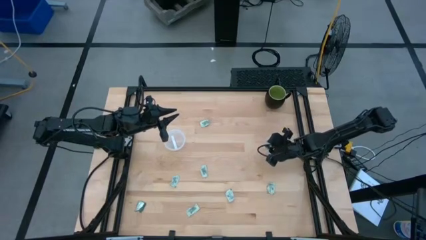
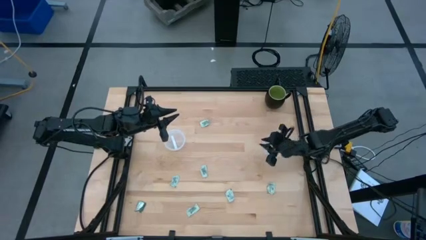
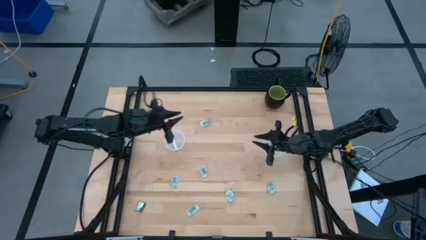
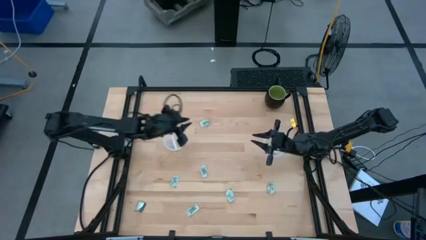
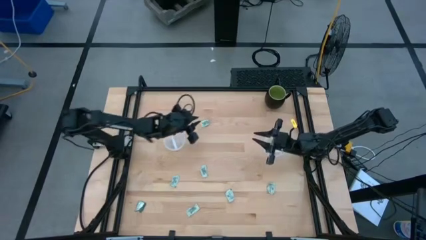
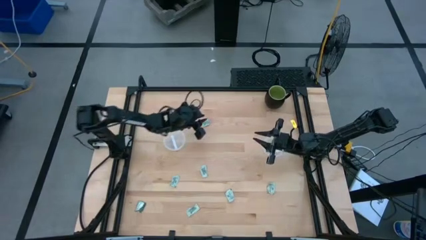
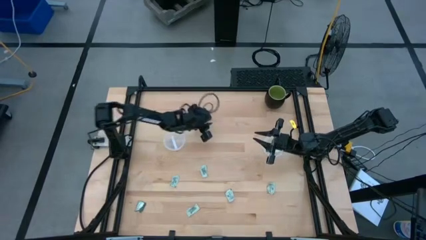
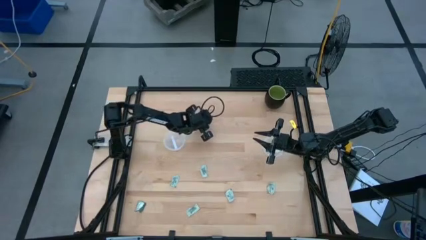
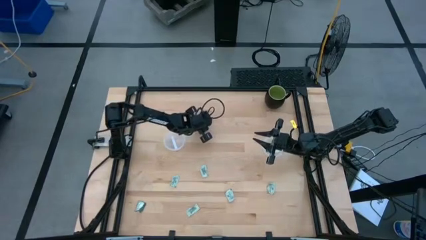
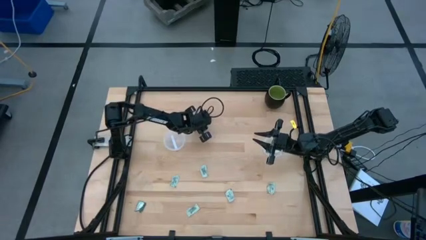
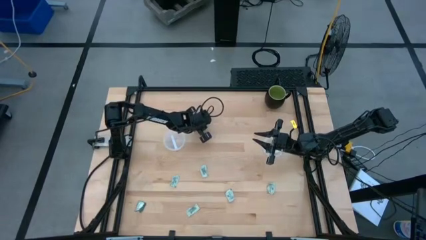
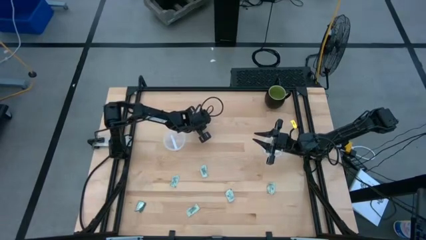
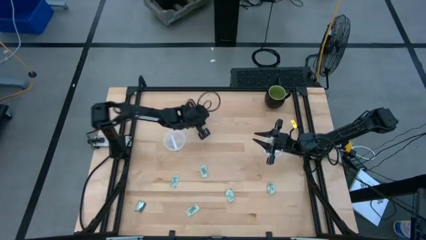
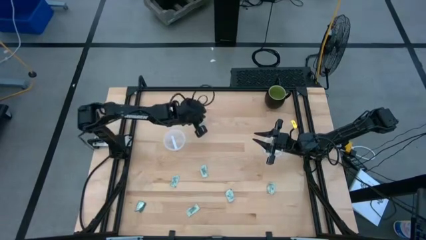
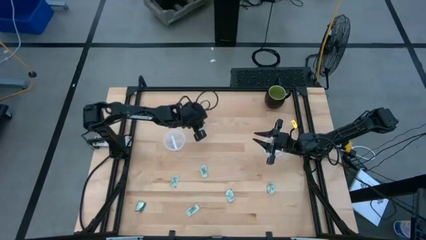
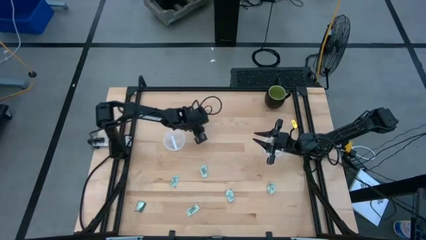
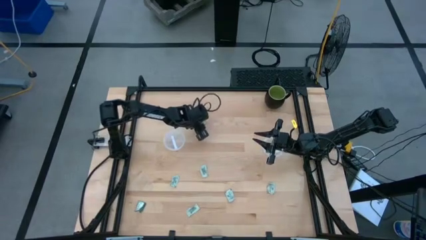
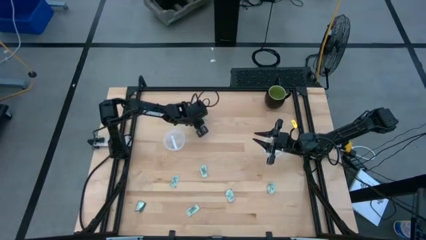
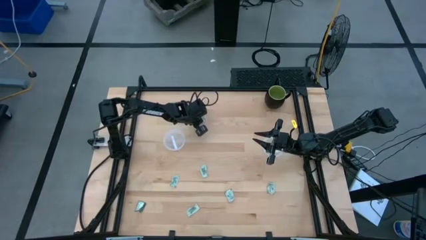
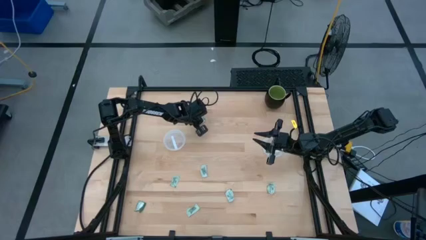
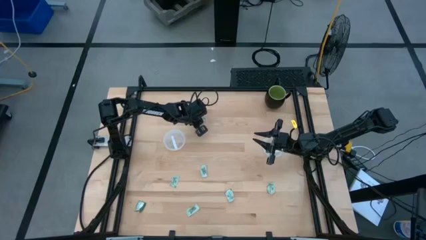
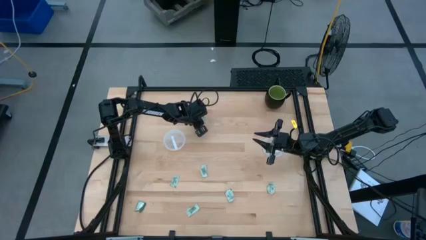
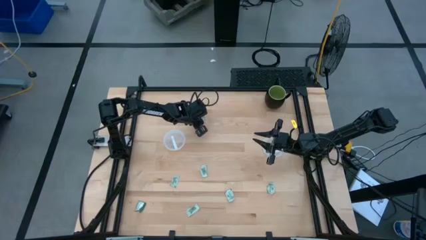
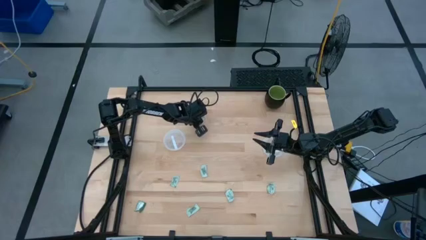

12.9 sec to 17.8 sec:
Task: Pick and place items into bin
Put the stevia packet into the left transparent bin

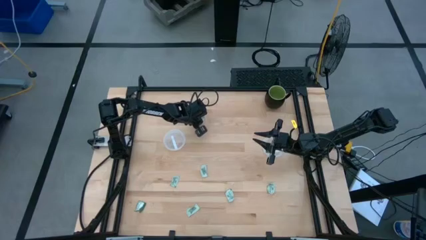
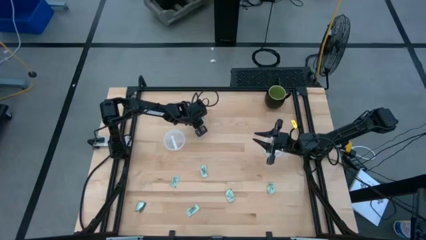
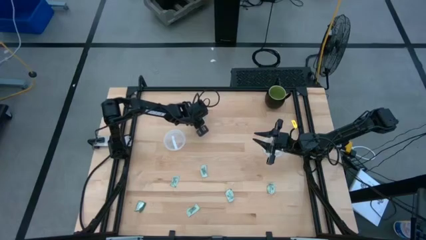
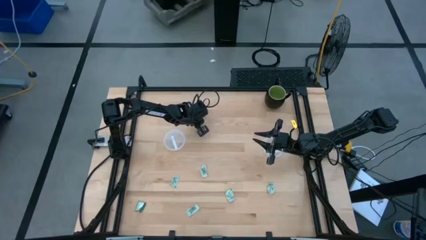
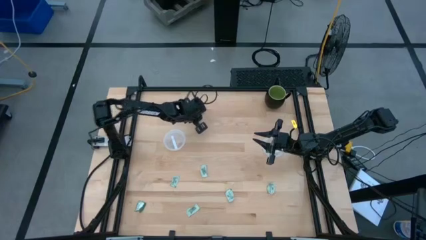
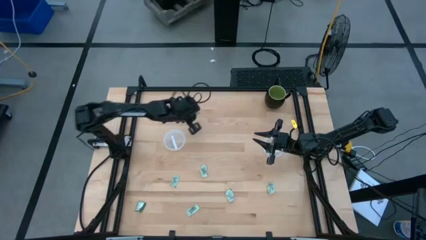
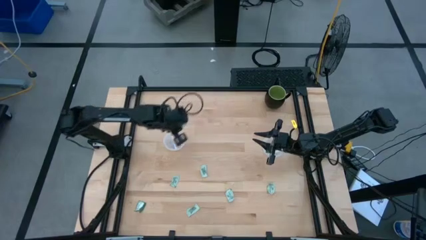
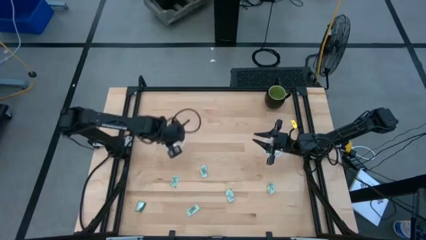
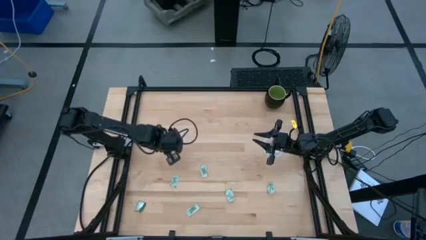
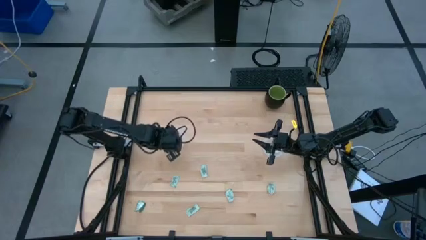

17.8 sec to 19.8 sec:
Put the stevia packet into the left transparent bin

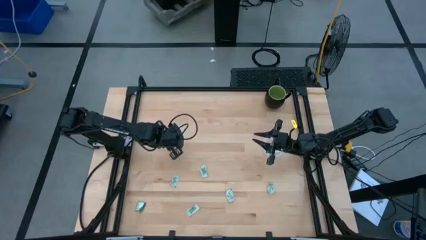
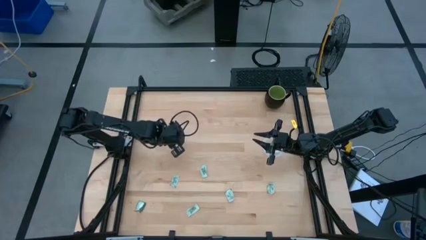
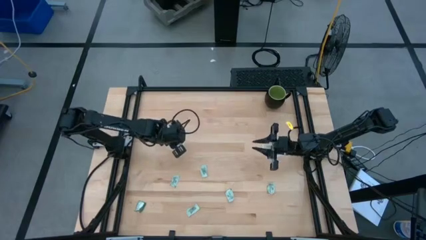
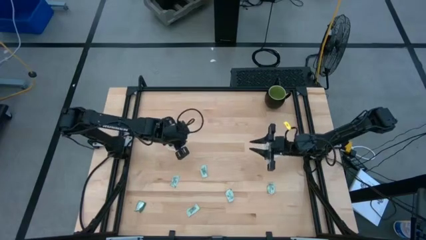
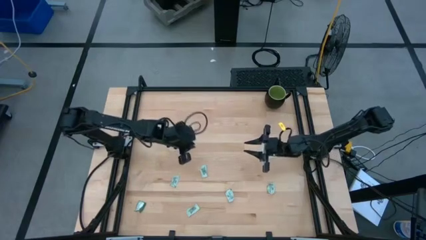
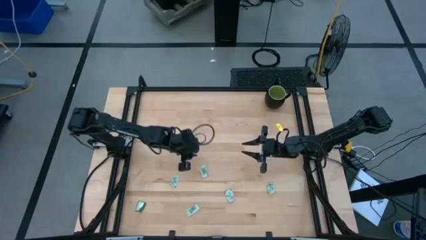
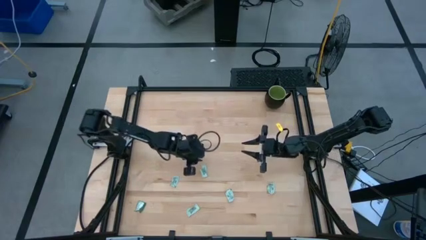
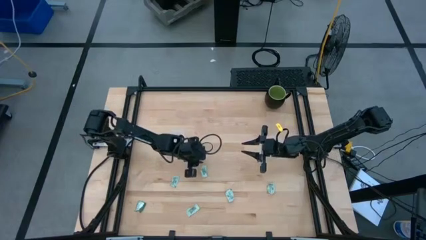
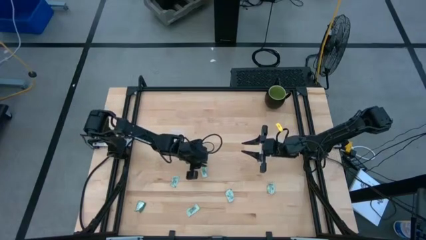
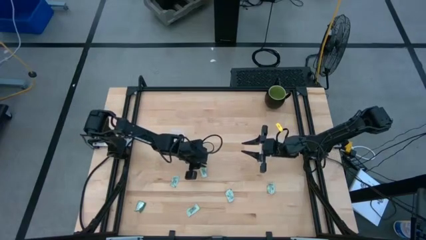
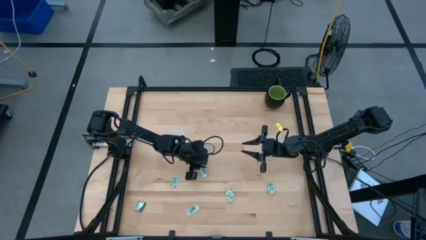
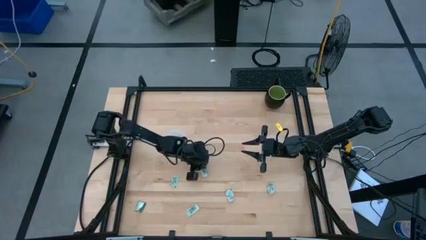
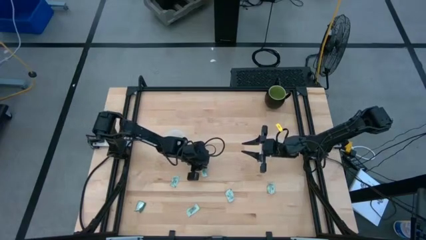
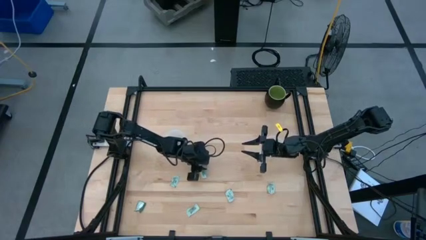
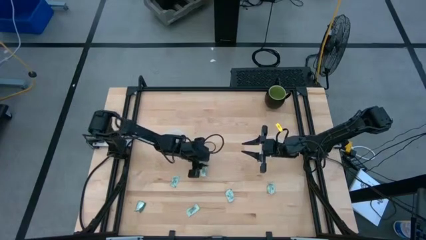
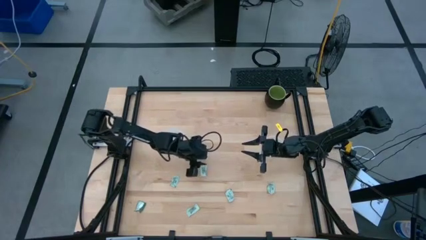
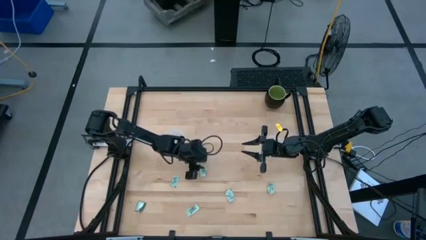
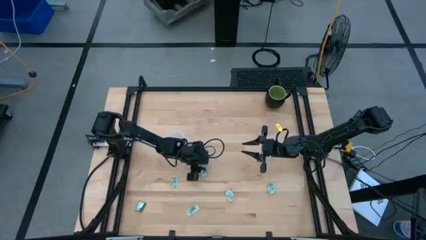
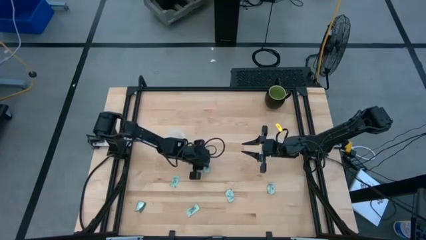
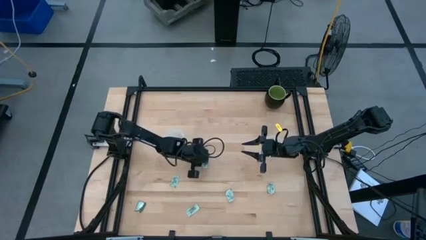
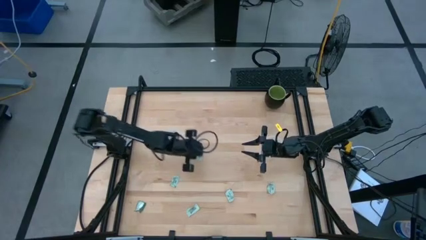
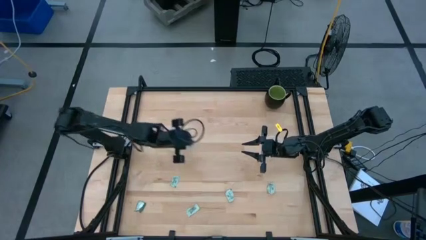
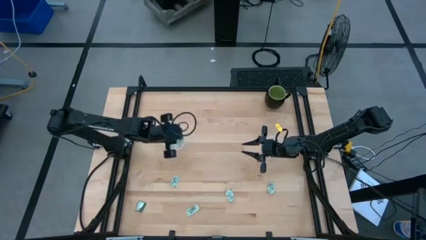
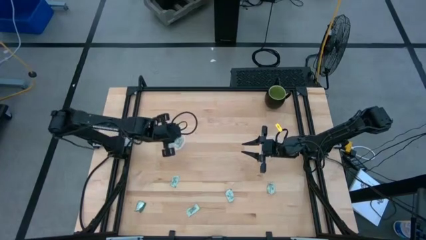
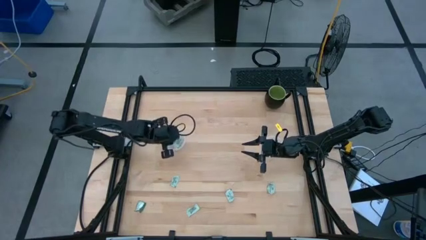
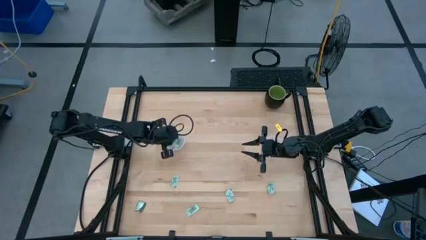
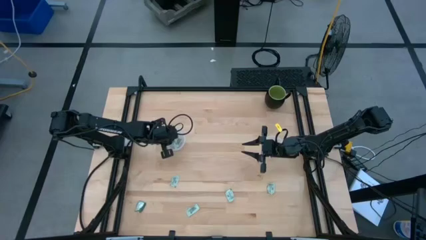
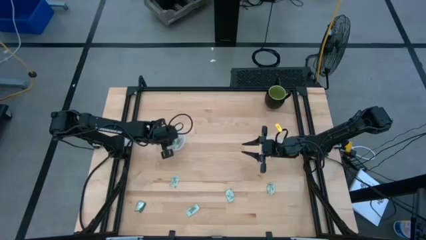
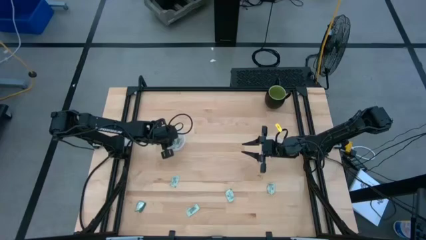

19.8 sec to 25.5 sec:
Put the stevia packet into the left transparent bin

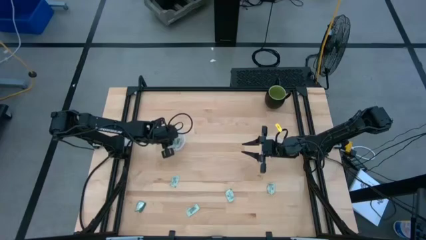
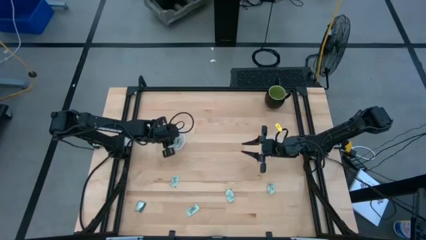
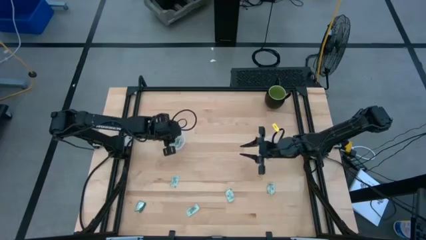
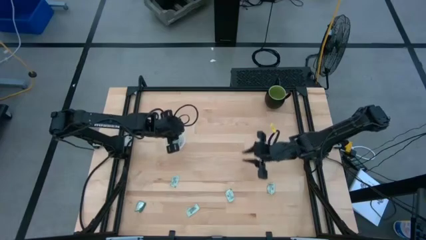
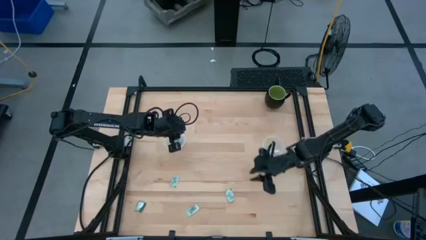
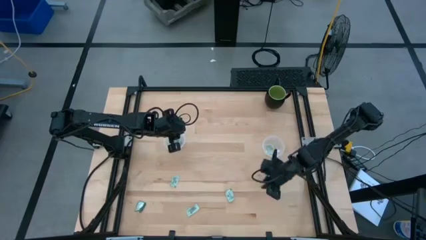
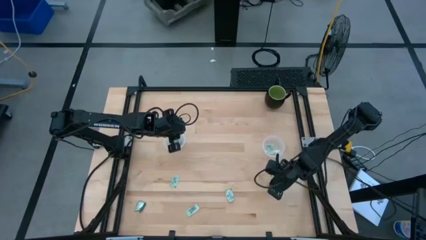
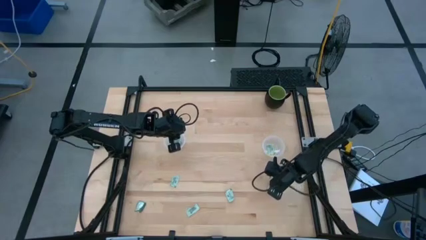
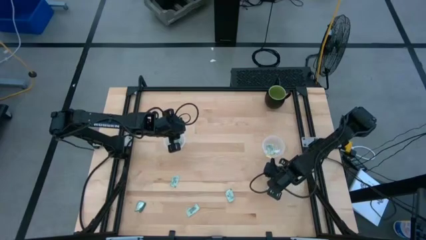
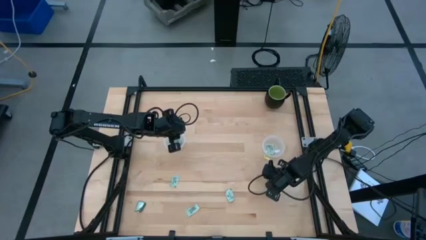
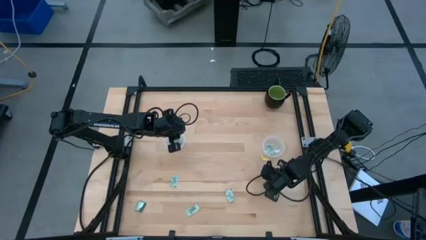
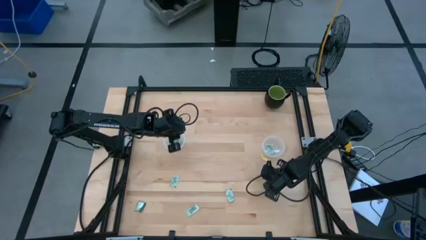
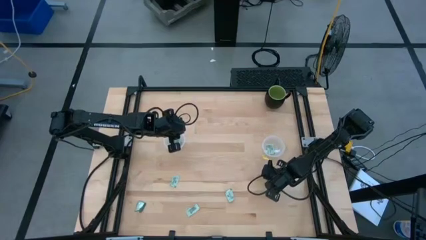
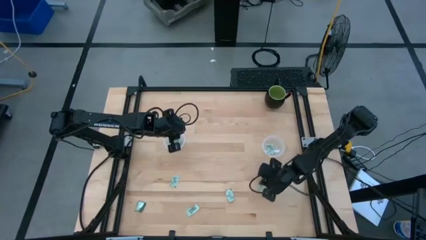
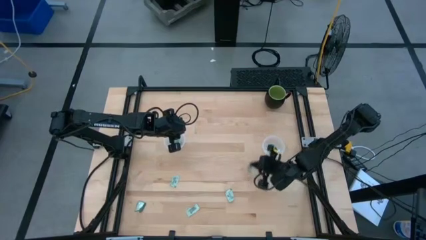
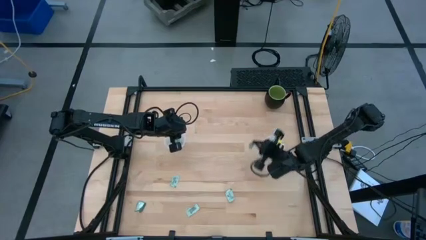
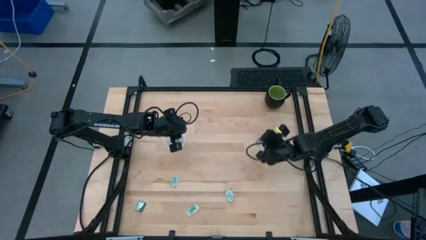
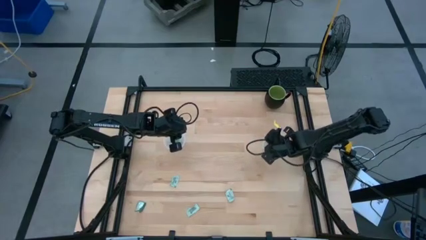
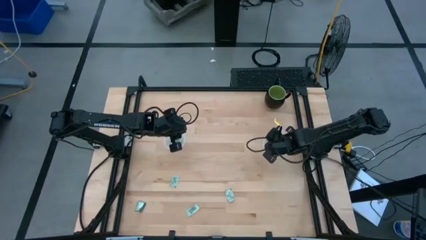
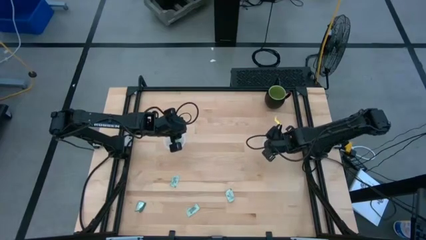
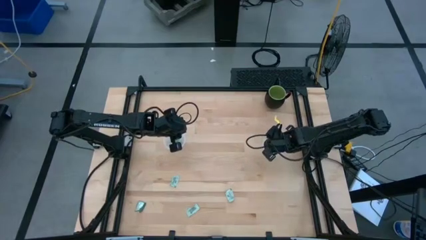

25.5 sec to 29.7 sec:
Put the stevia packet into the right transparent bin
